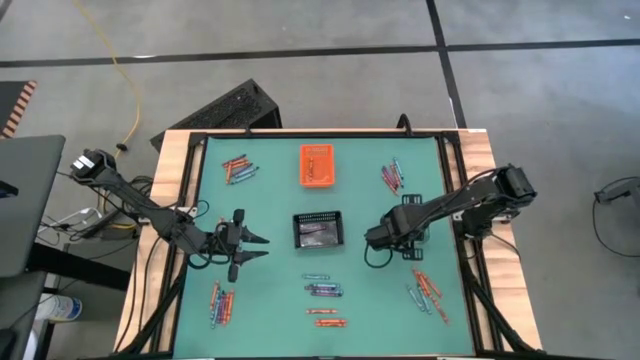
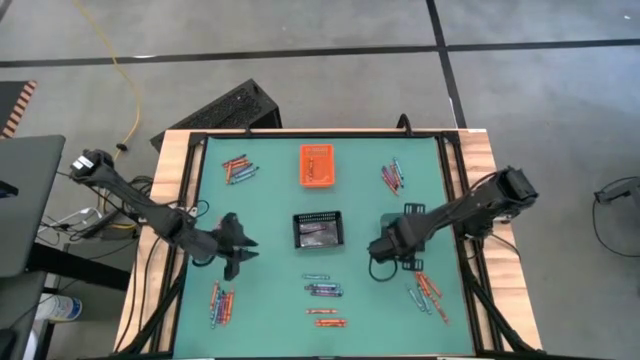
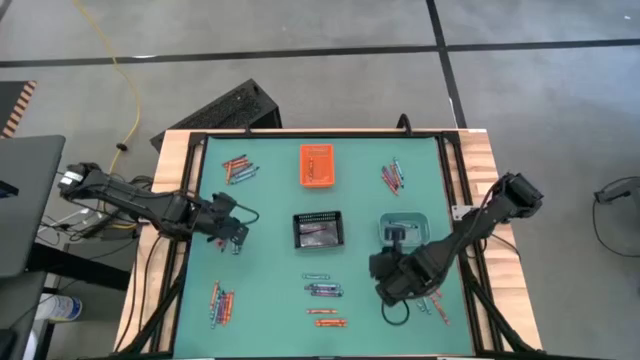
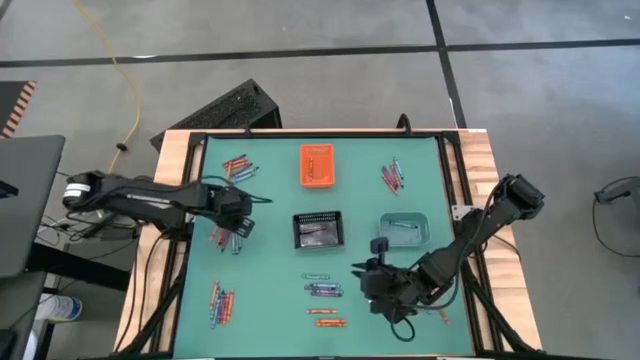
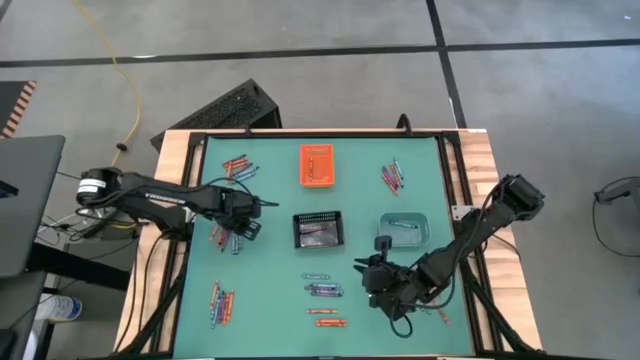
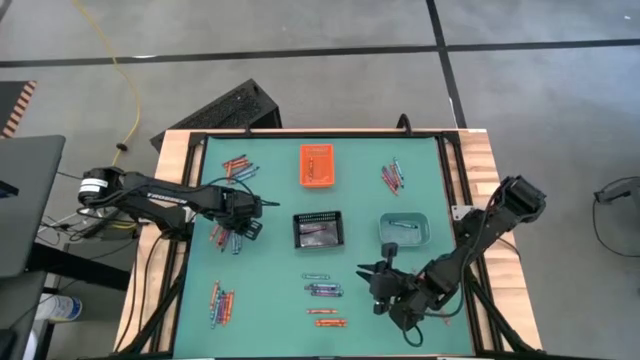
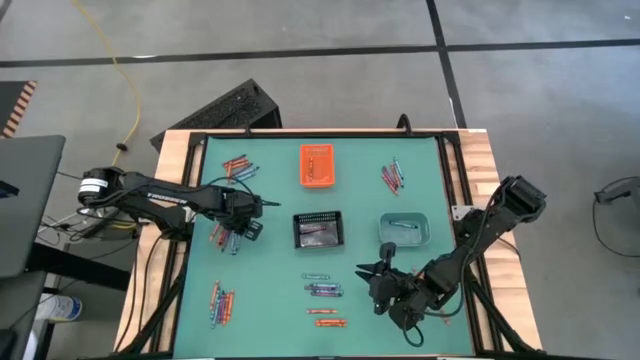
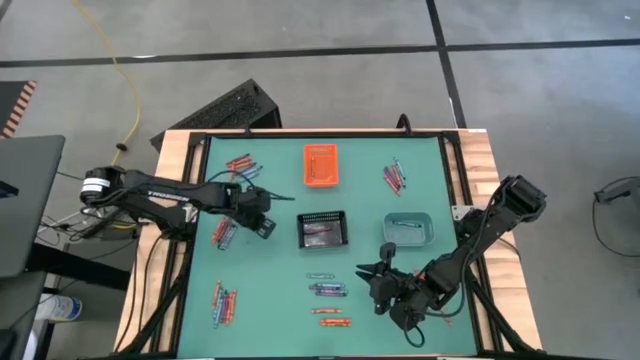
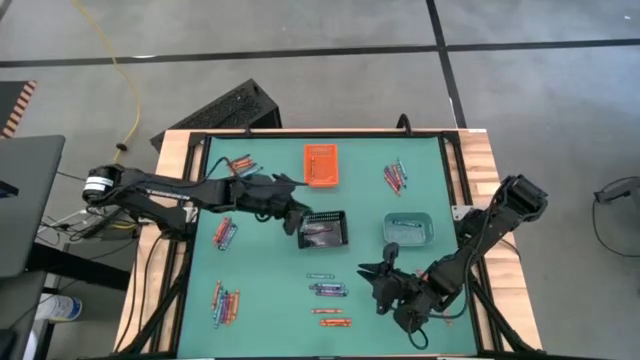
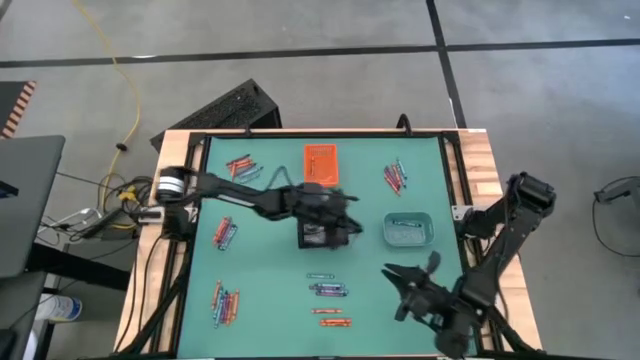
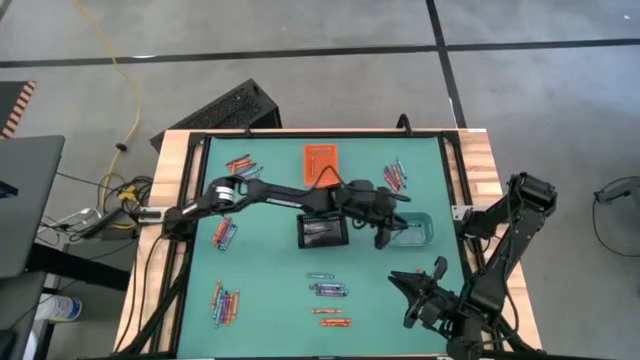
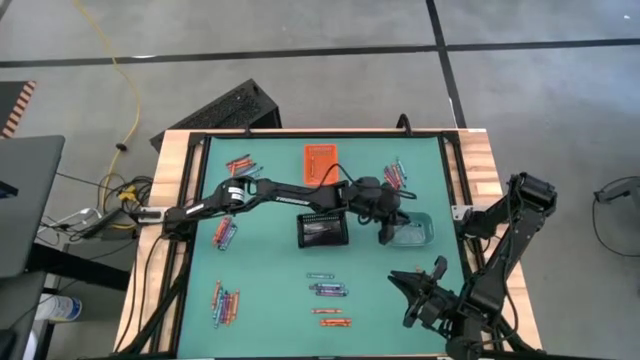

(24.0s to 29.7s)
Task: Sort crayons
Put the blue crayon into the green bin

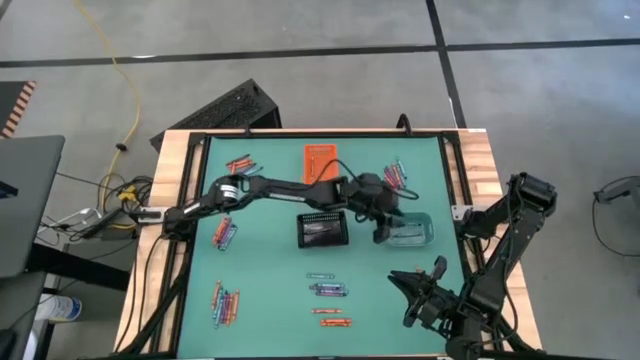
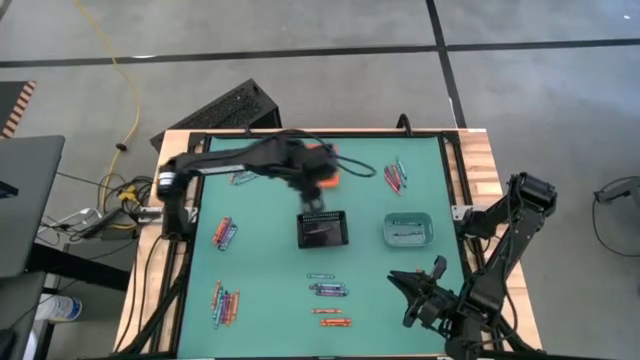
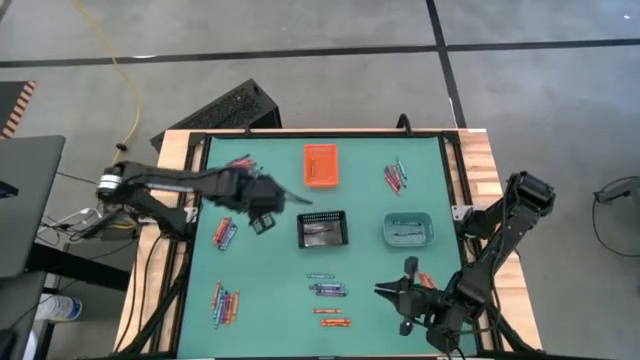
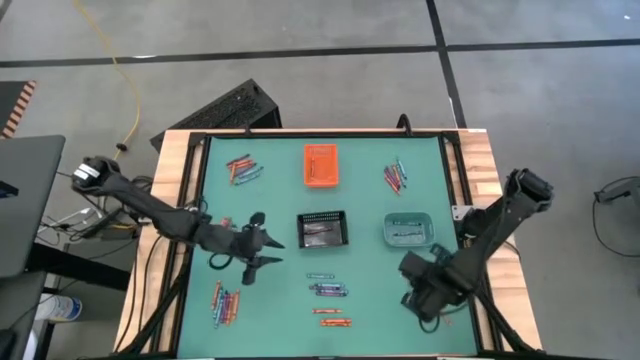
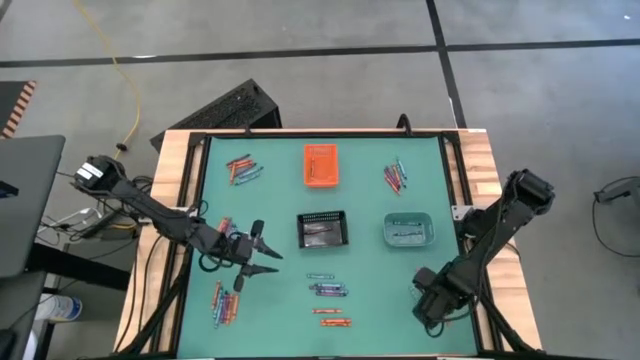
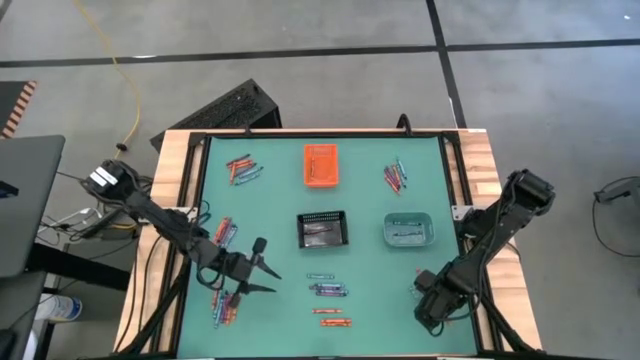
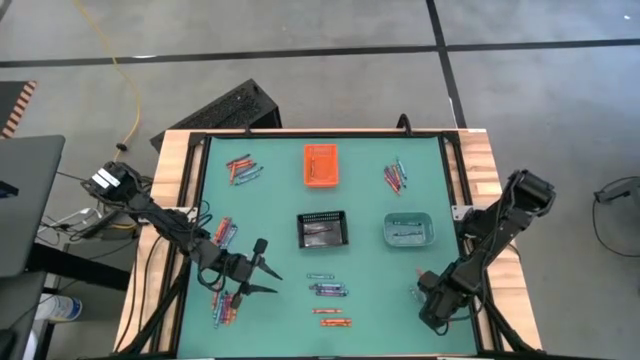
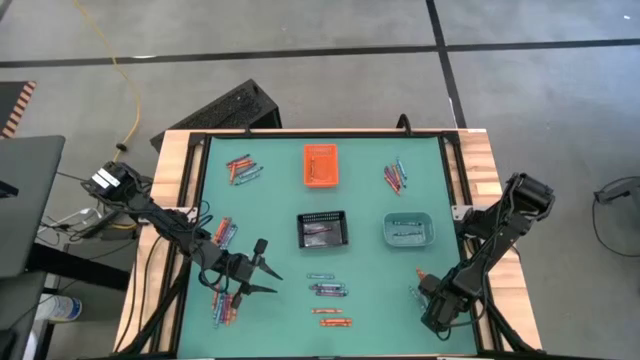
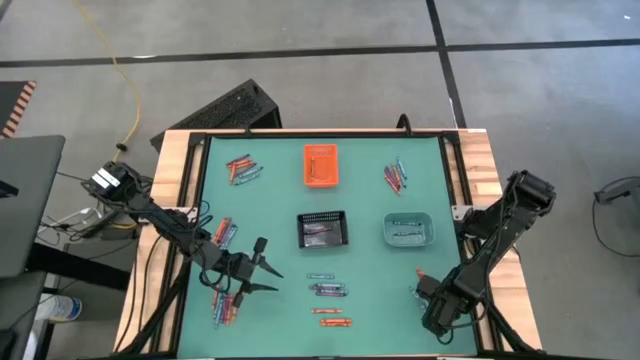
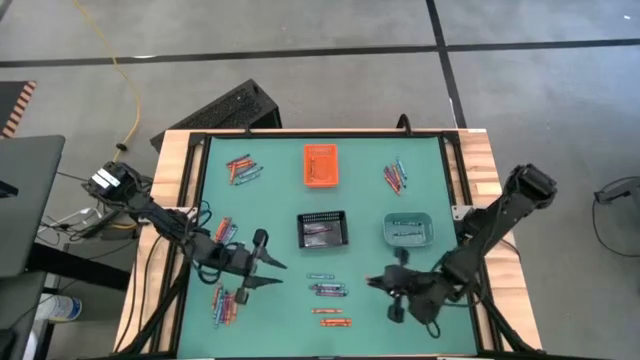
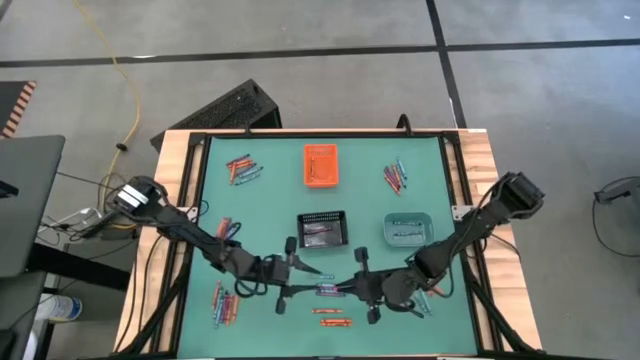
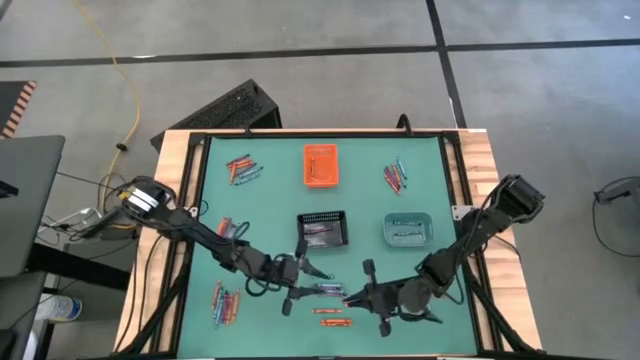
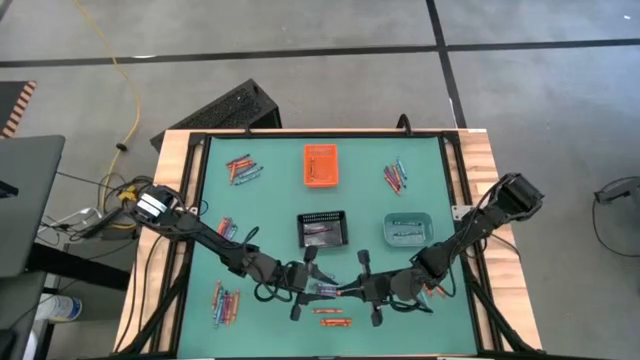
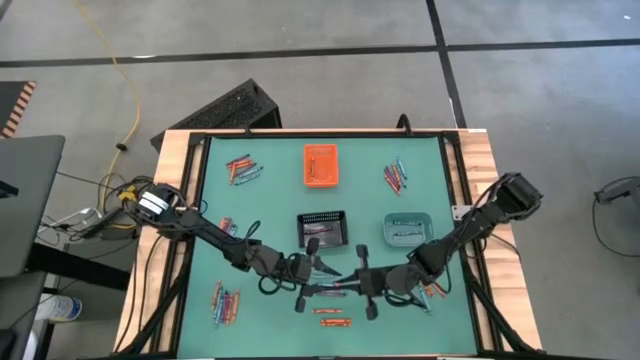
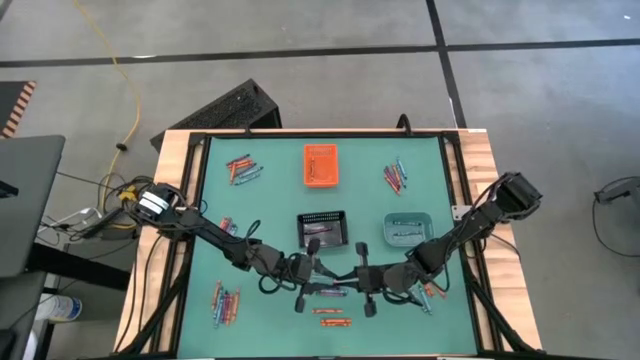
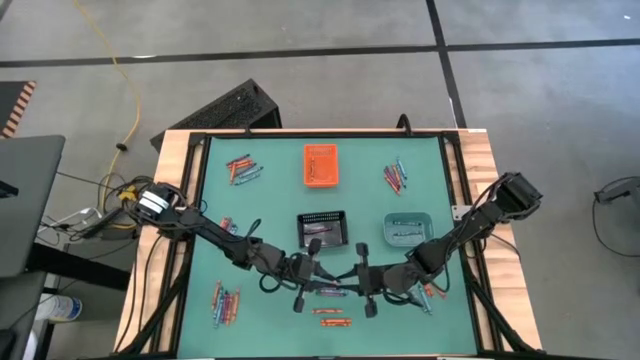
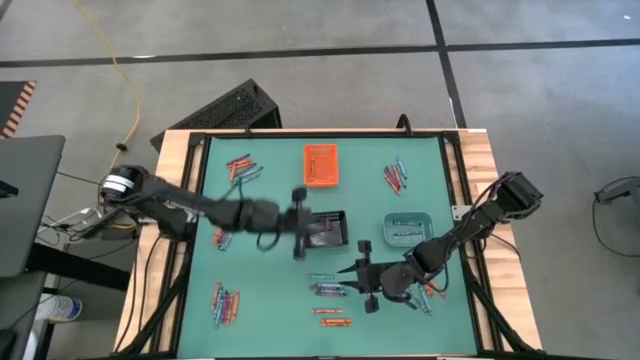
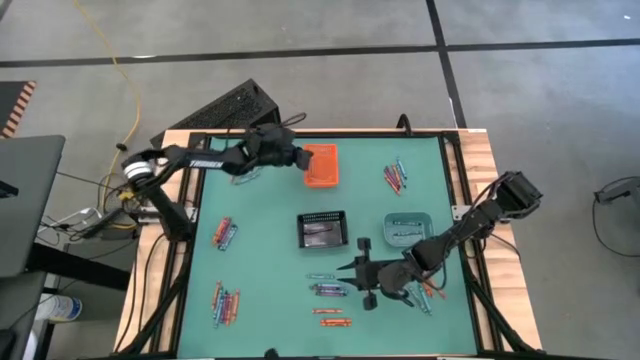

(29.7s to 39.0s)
Put the orange crayon into the orange bin

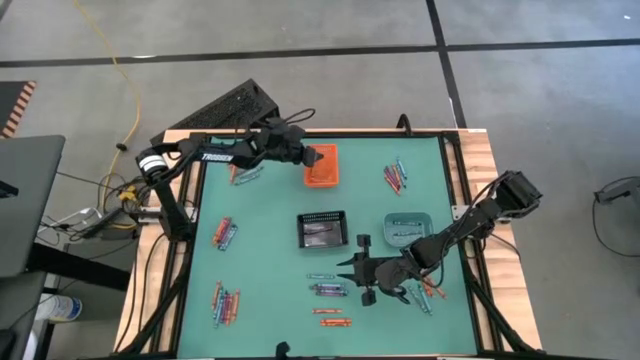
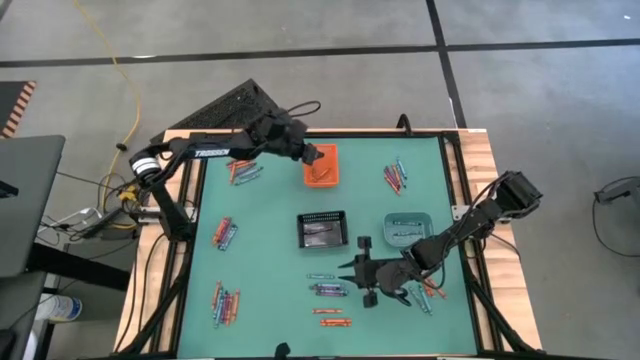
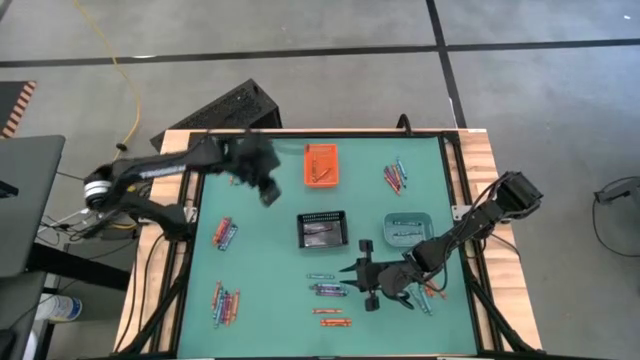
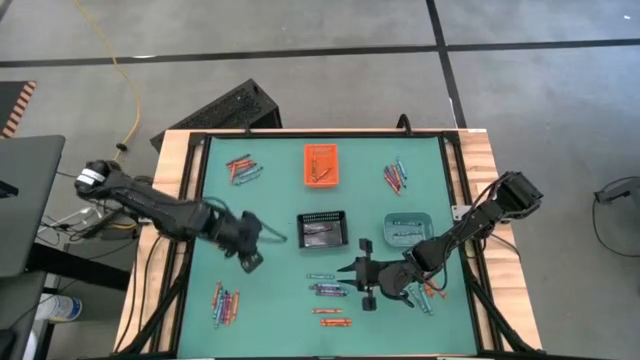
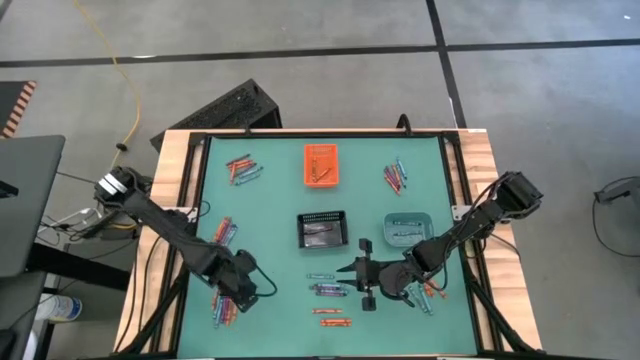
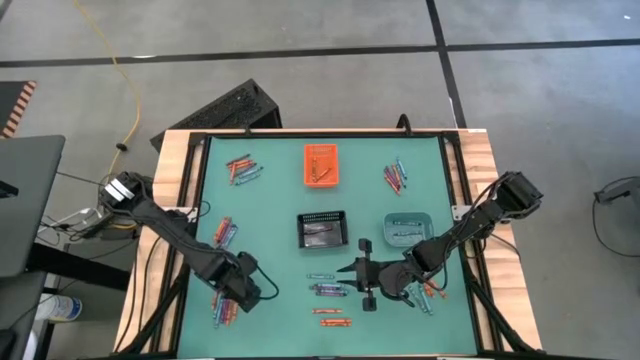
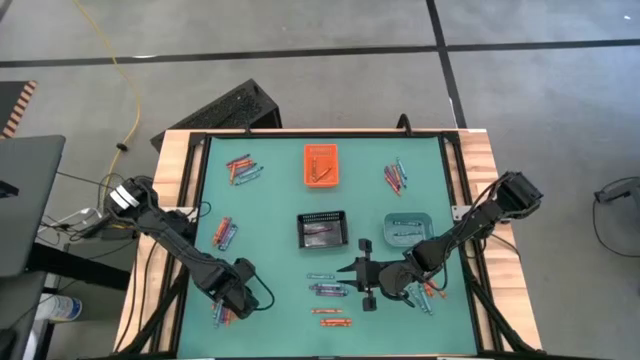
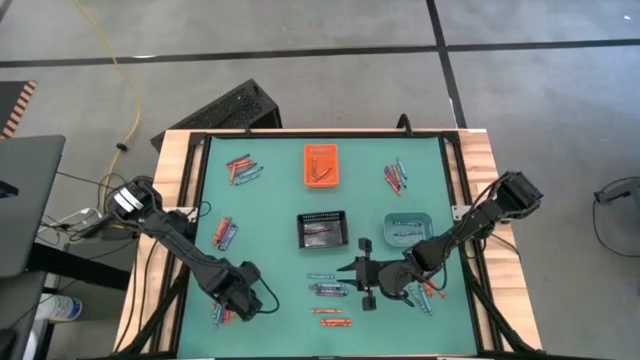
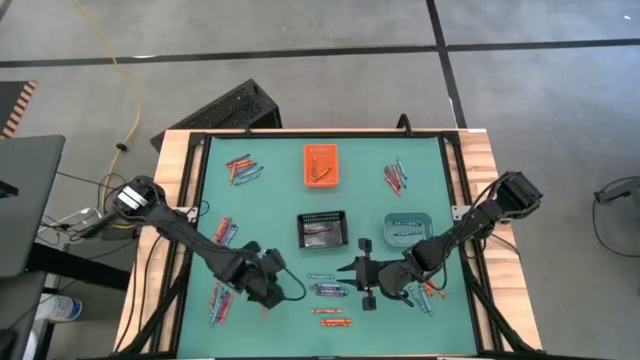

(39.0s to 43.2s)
Put the orange crayon into the orange bin

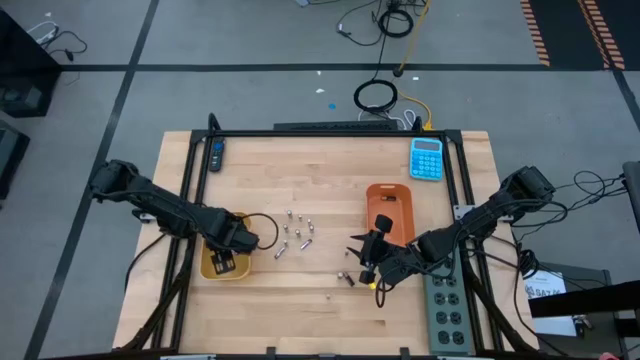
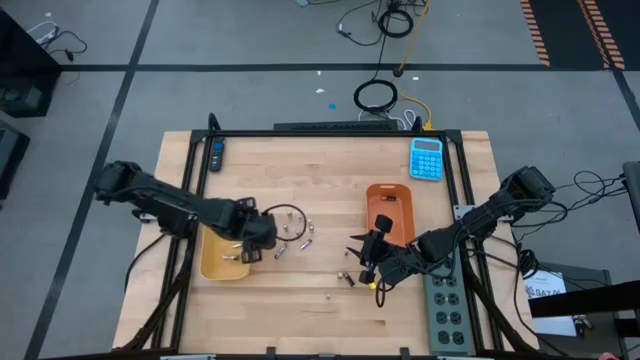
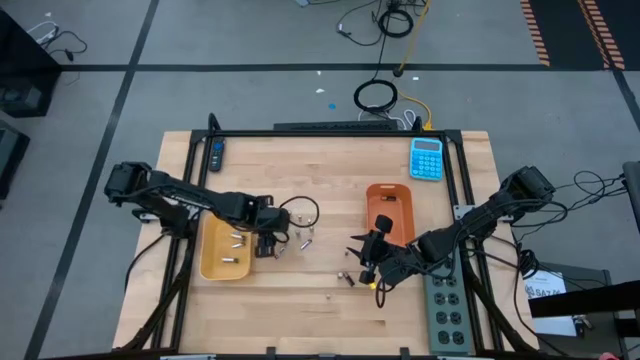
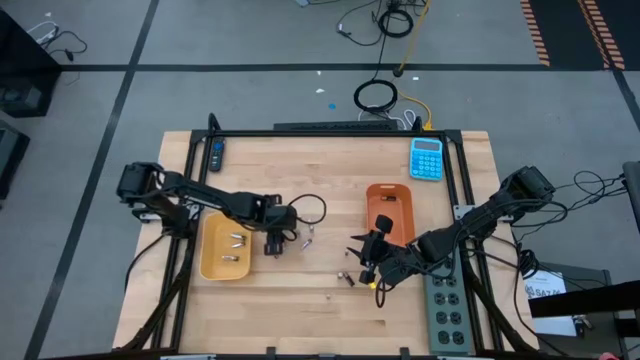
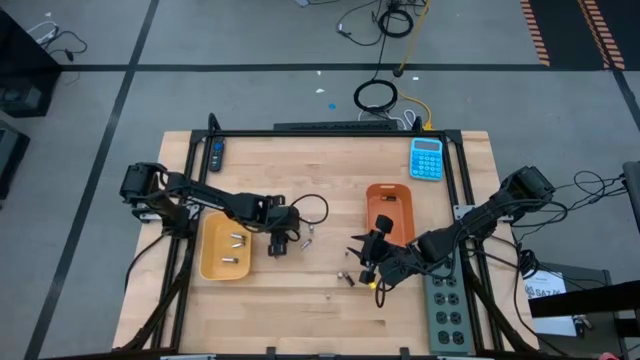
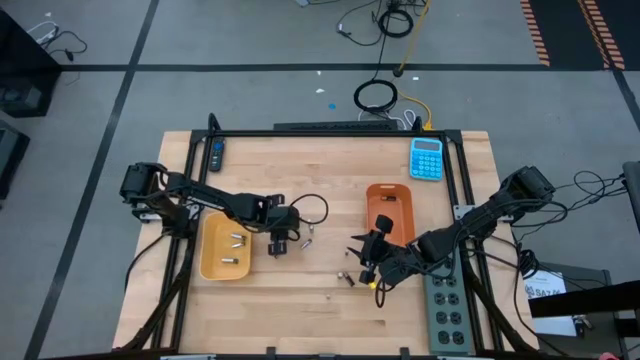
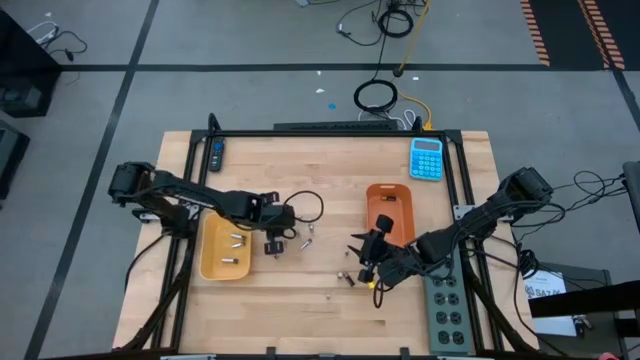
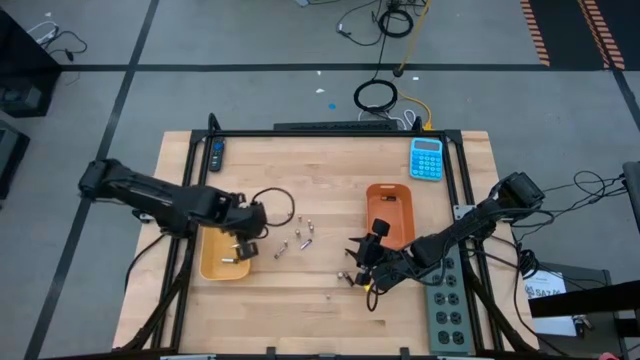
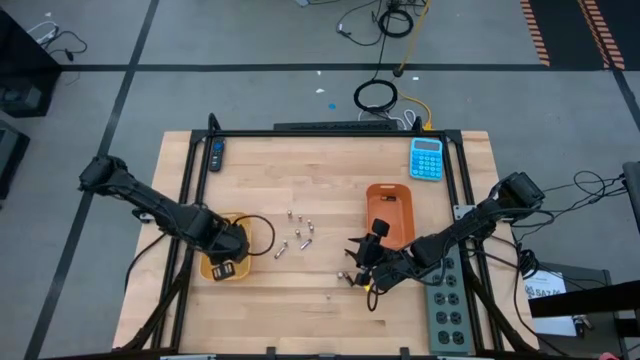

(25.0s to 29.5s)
Task: Sort batteries
Put the silver battery into the yellow bin
